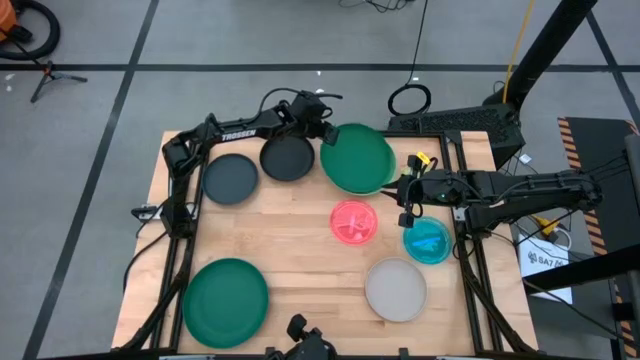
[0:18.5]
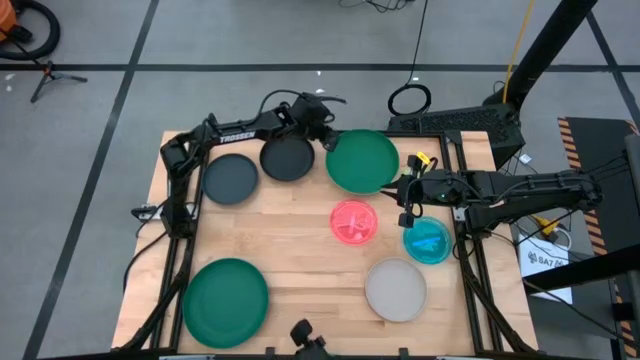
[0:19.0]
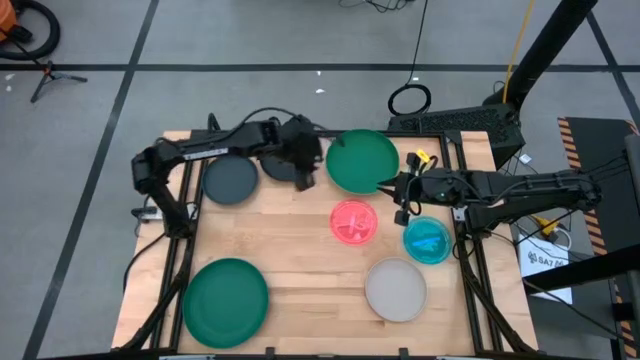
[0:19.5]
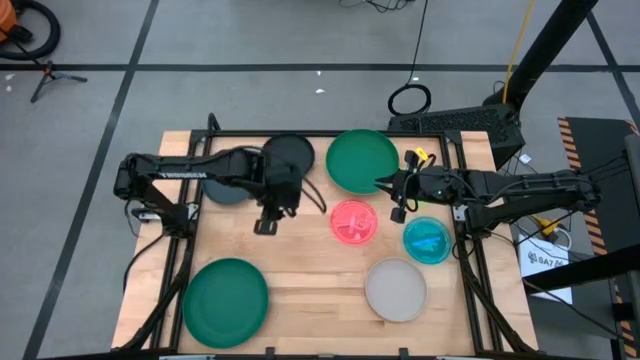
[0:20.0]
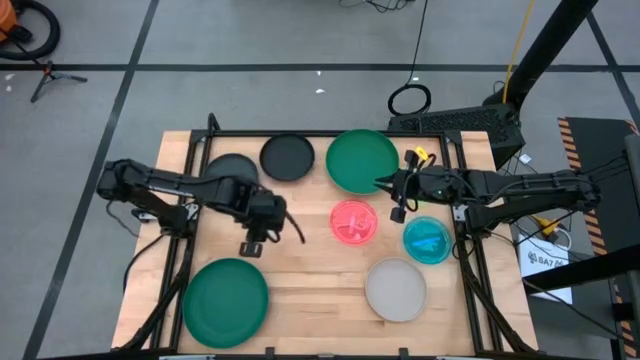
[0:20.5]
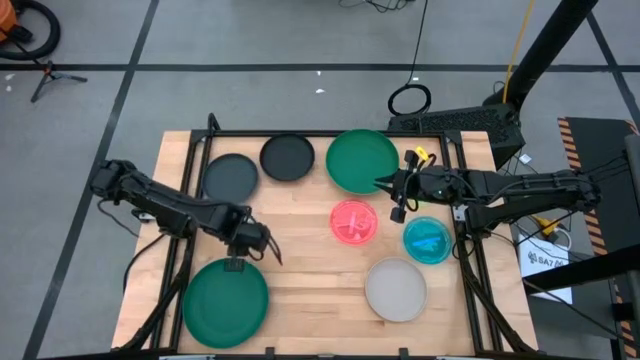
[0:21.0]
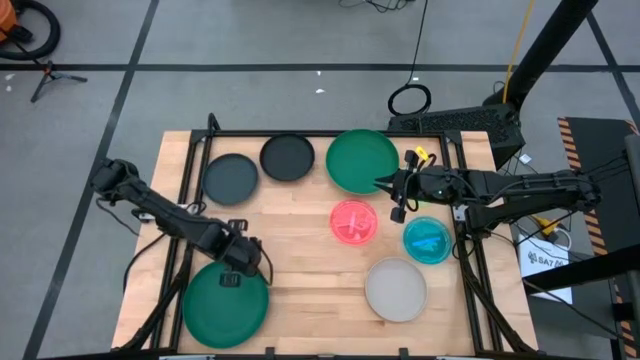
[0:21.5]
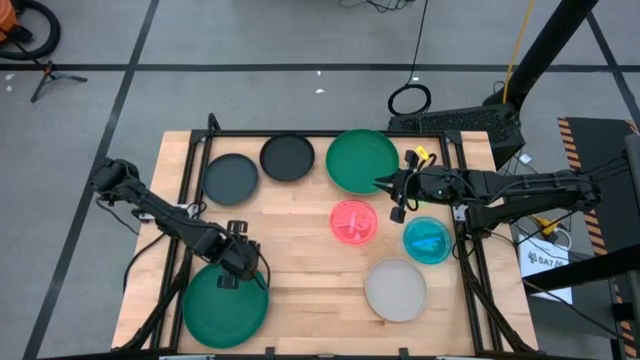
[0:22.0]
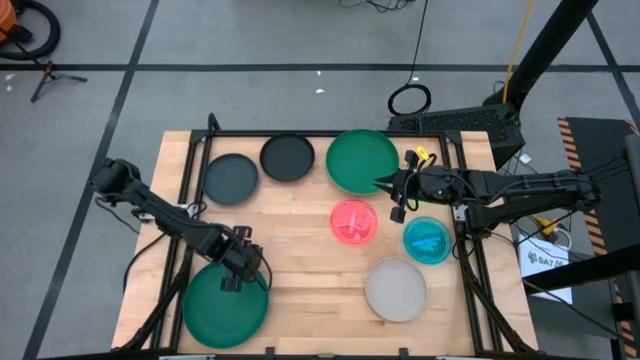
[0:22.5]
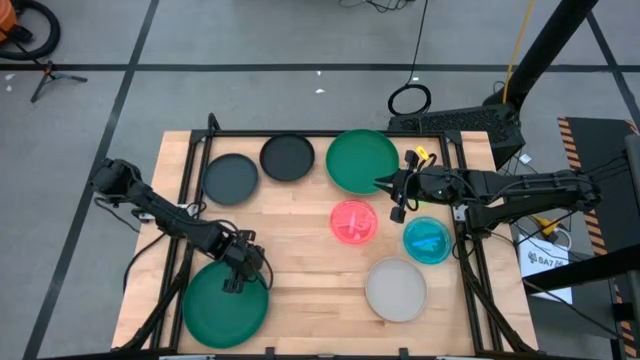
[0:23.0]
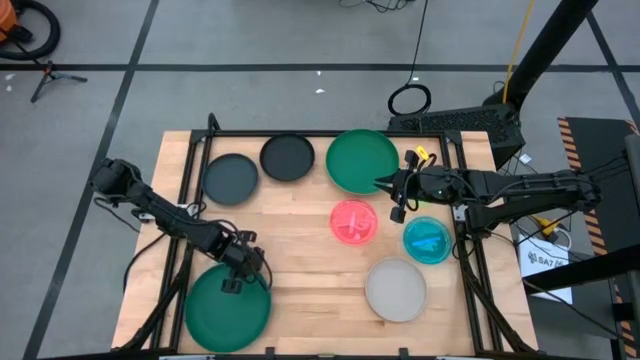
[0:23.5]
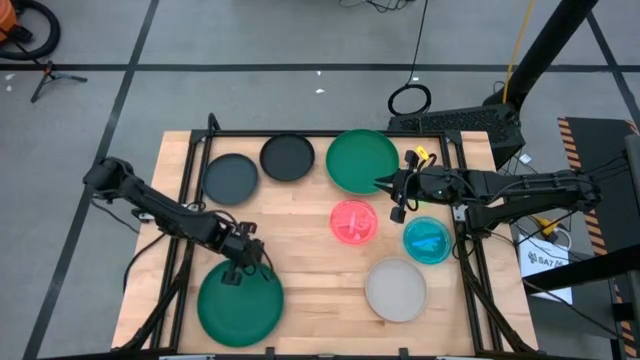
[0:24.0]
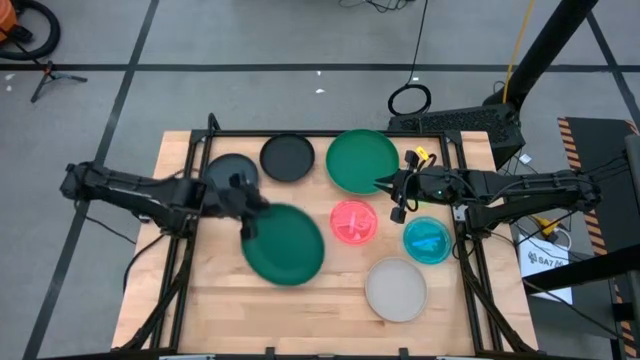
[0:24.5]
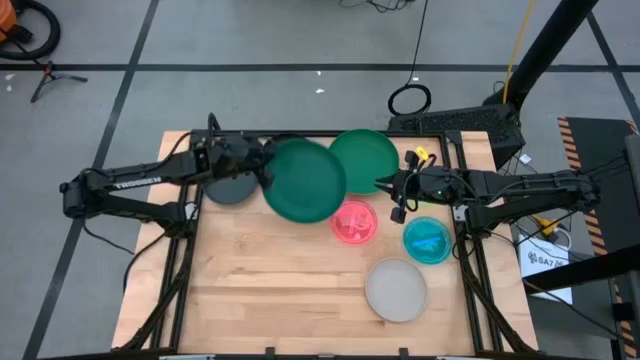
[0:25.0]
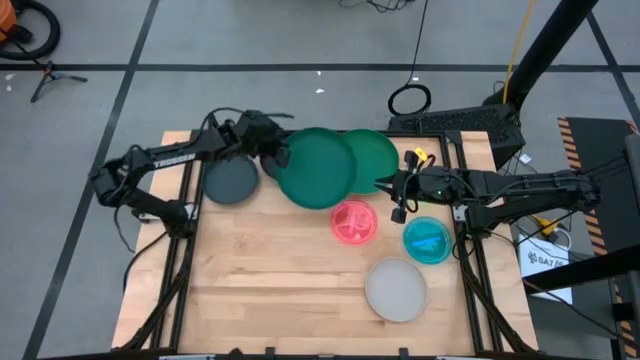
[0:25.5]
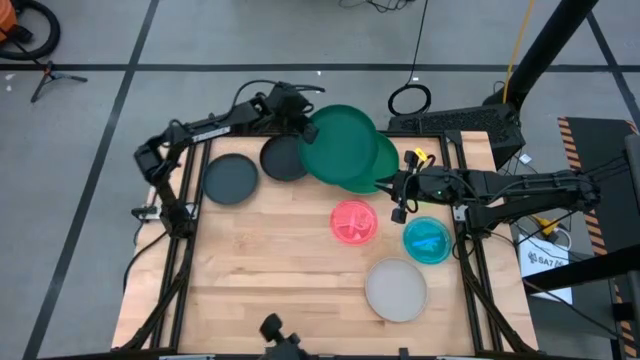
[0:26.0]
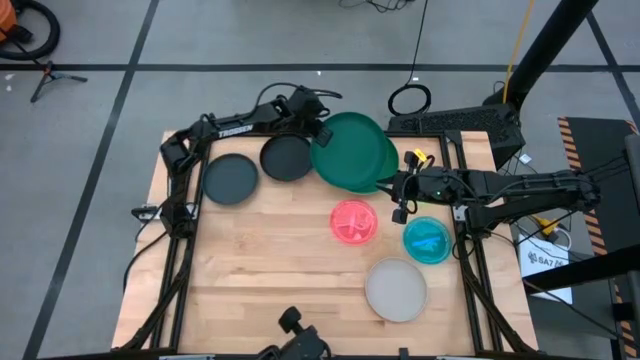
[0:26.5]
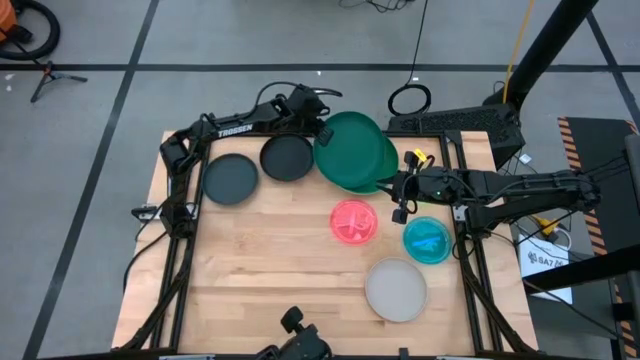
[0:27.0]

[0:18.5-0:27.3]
Task: Stack plastic plates
Stack the dark green plate on top of the green plate

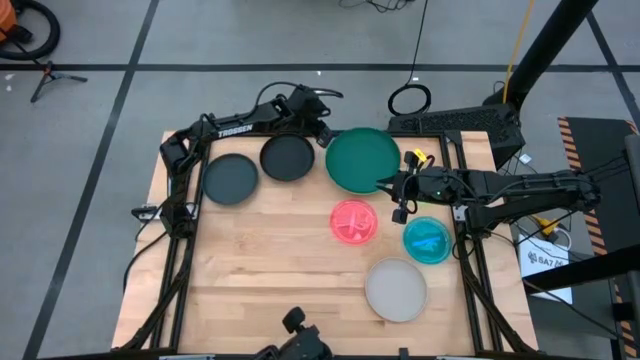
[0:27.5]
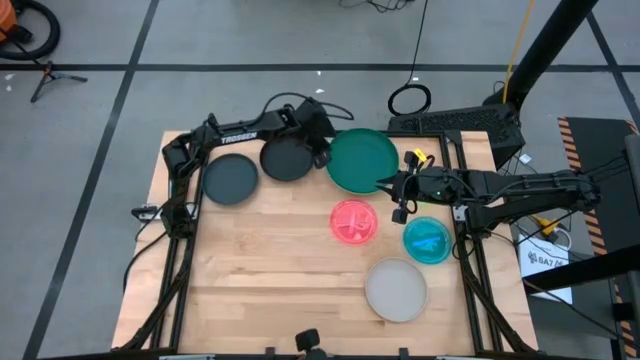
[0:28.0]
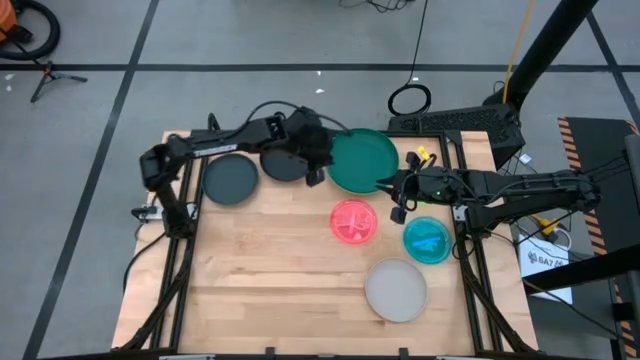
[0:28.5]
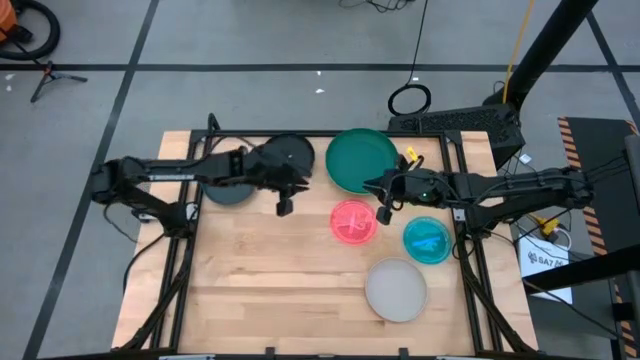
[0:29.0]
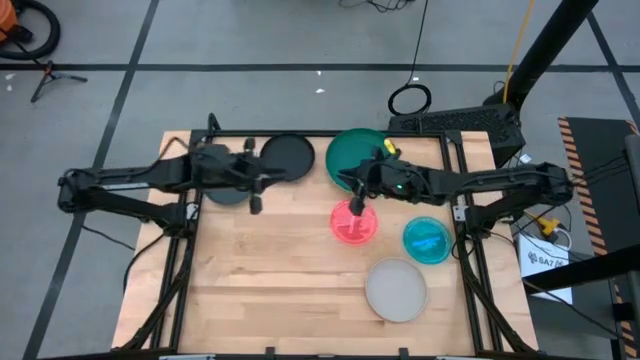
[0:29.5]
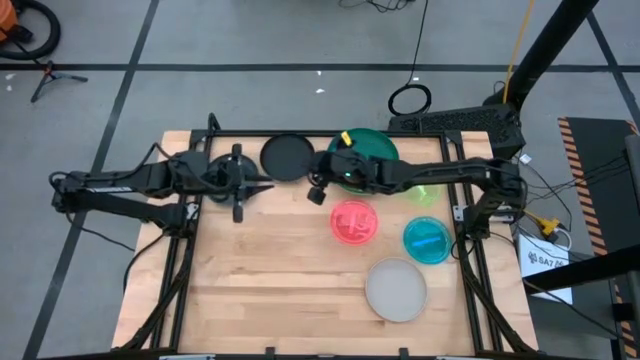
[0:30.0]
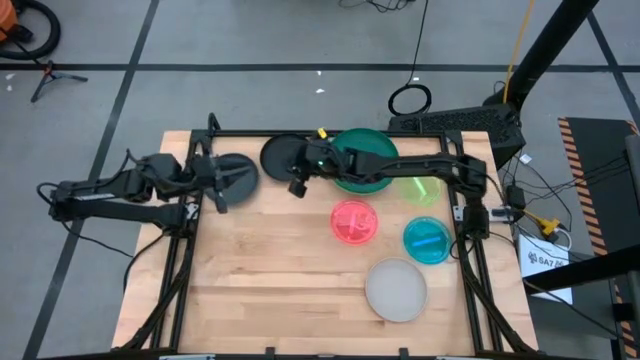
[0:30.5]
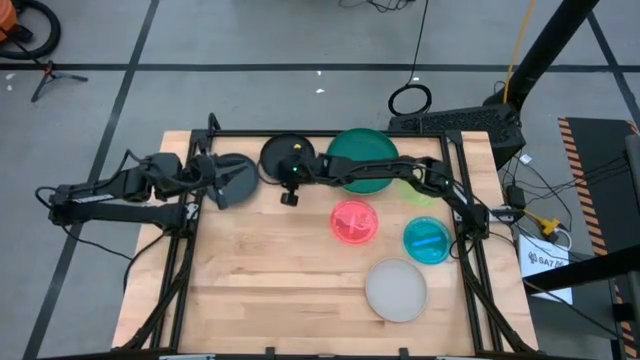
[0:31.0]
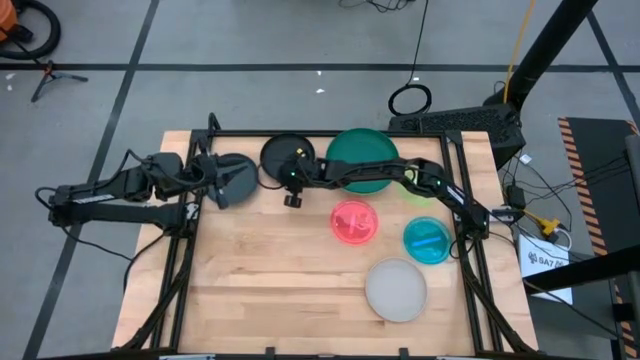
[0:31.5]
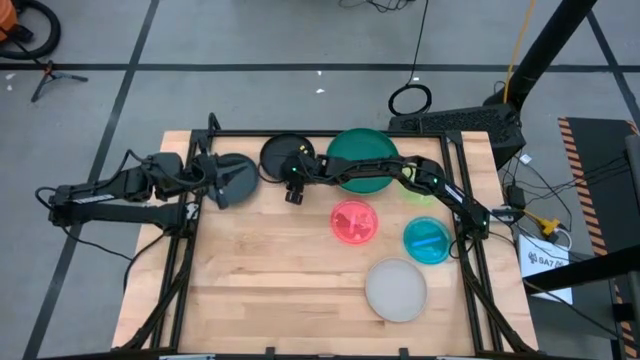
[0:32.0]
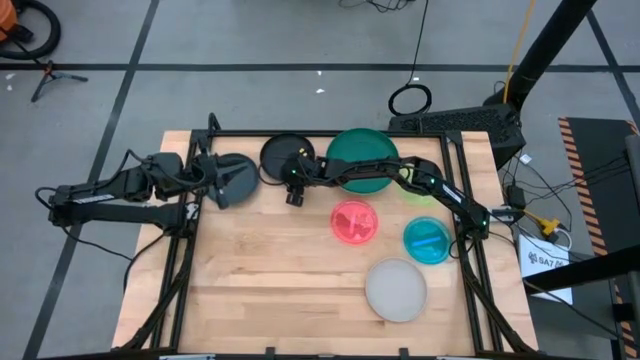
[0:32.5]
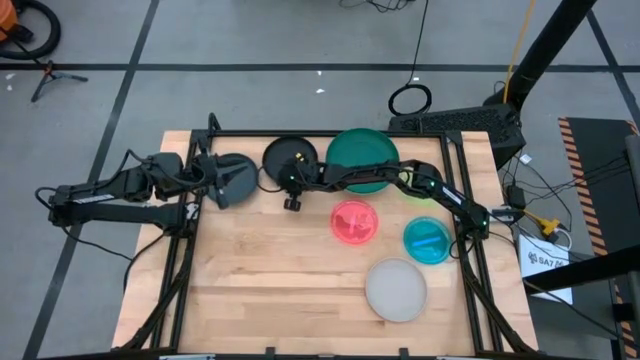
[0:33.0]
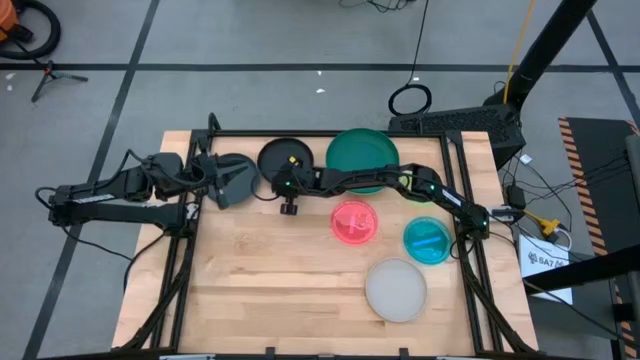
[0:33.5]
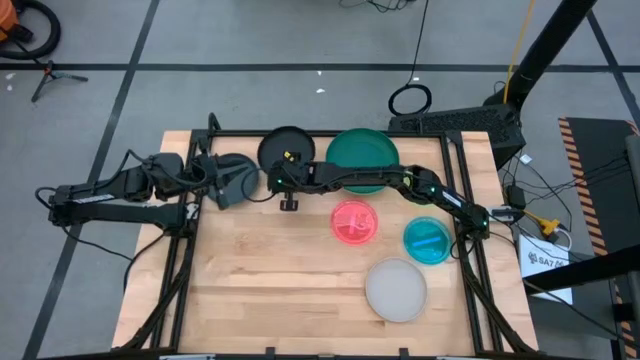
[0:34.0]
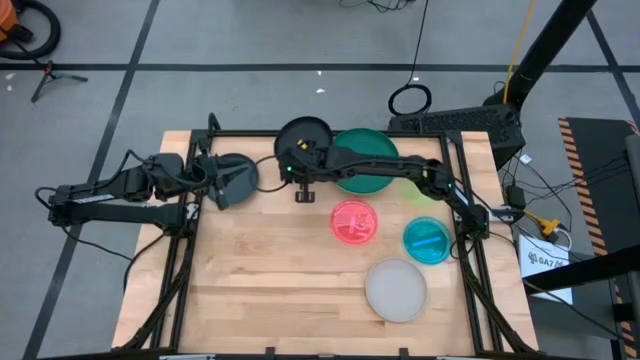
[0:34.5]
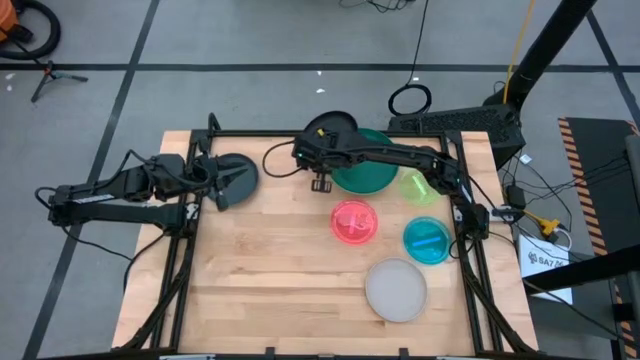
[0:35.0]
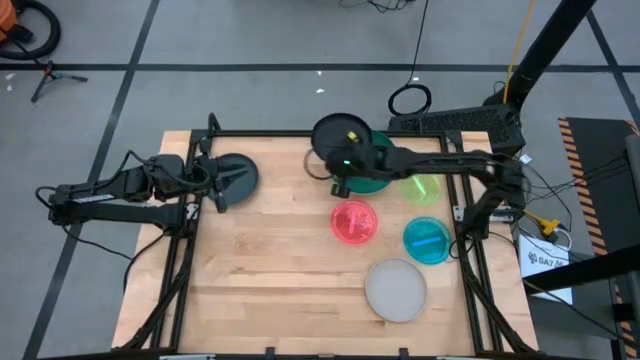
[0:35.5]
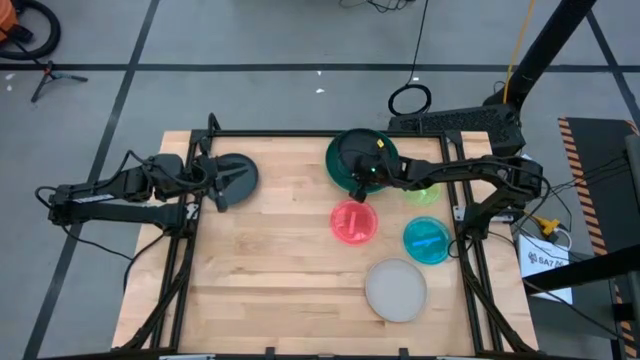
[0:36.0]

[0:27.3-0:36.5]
Stack the right black plate on top of the dark green plate

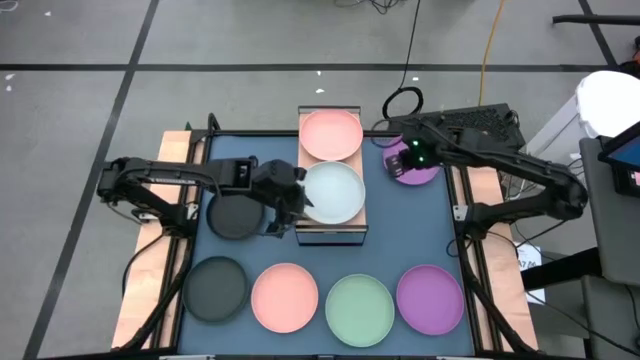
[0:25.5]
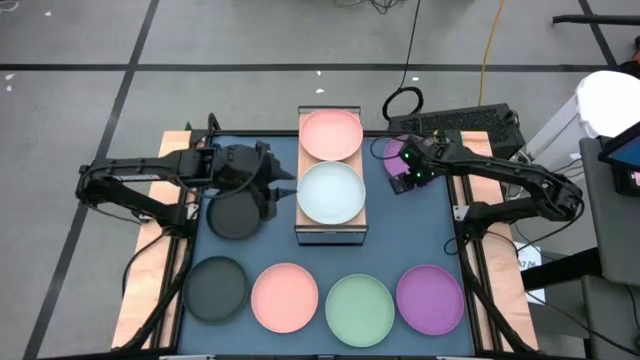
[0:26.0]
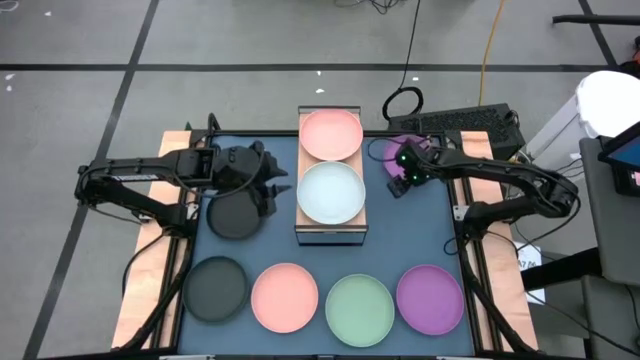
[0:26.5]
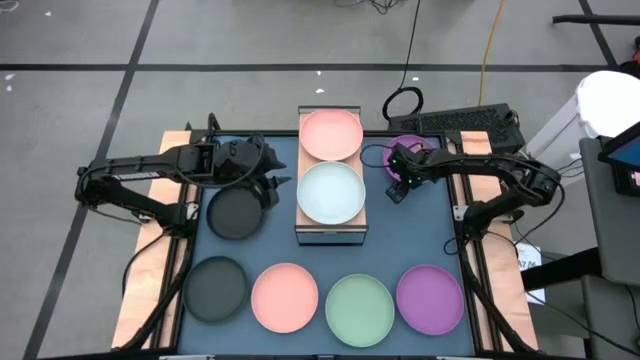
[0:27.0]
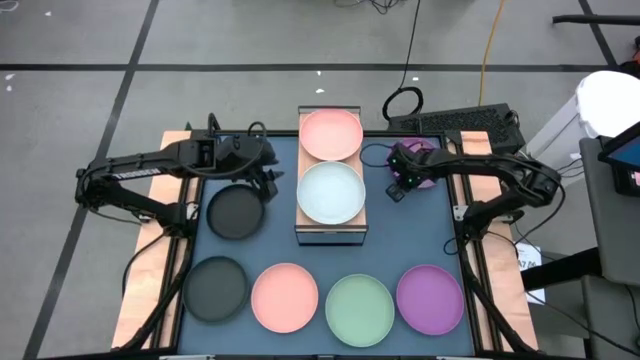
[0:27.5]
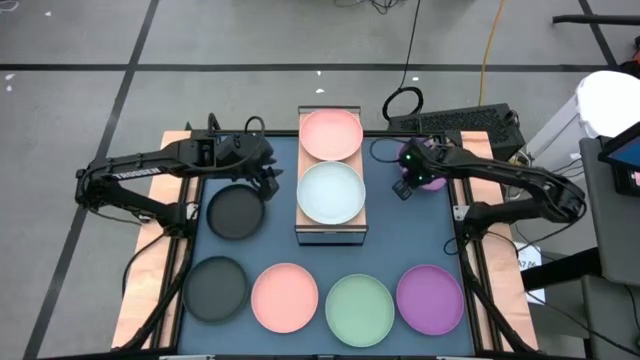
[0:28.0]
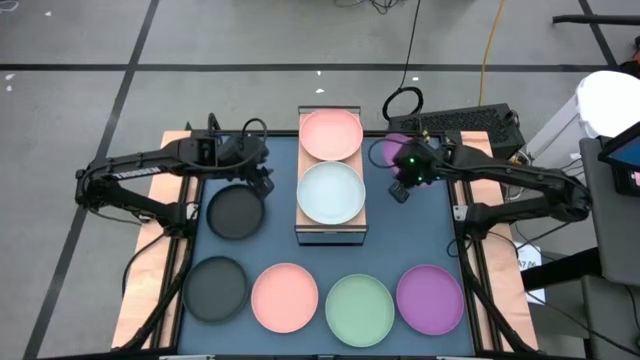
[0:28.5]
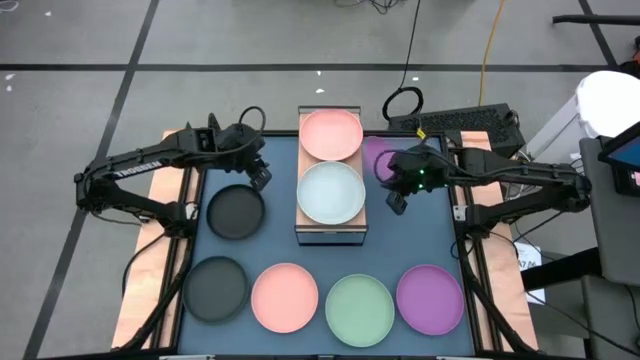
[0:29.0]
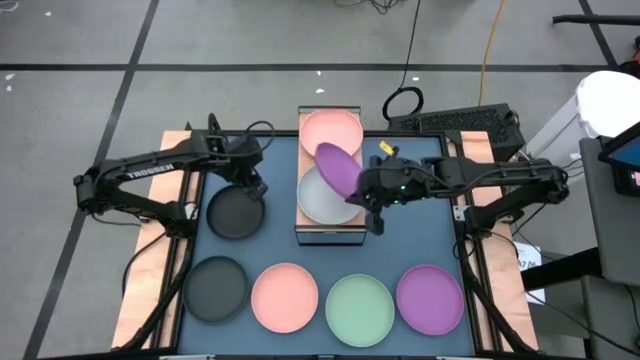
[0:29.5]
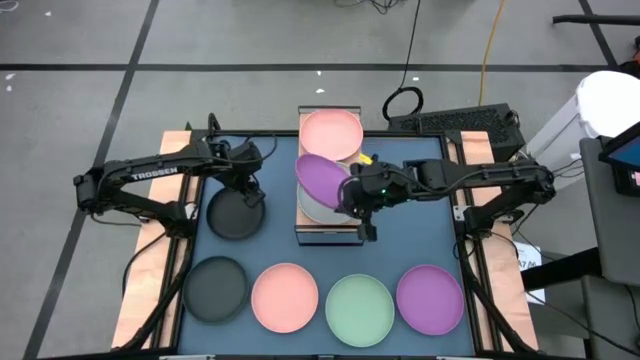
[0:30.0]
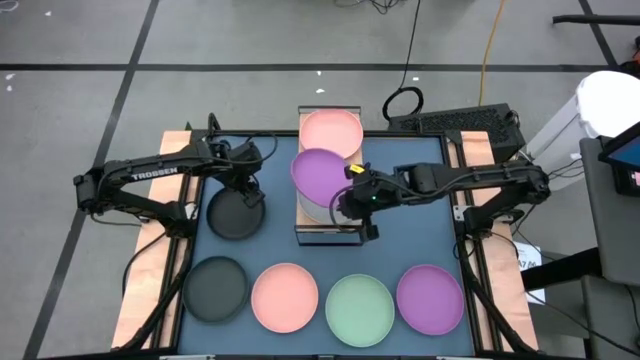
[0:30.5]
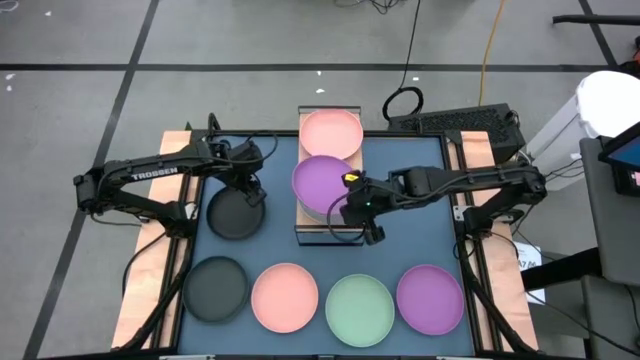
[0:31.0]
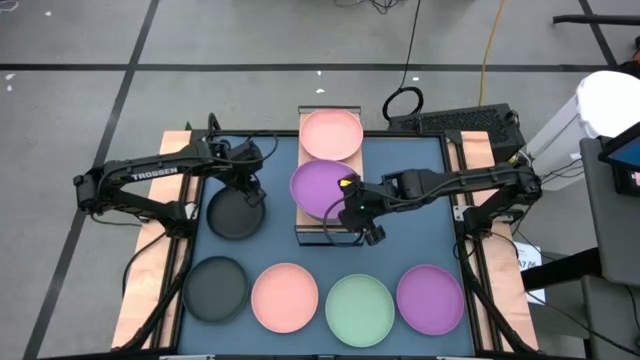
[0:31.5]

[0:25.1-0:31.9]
Task: Place and stack plates onto a shelf
Stack the top purple plate on top of the blue plate on the shelf
